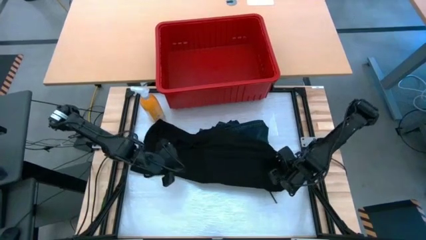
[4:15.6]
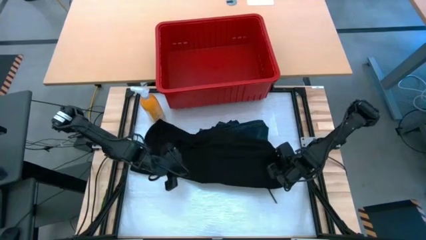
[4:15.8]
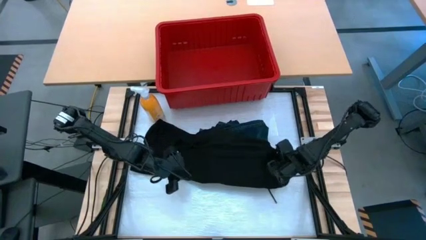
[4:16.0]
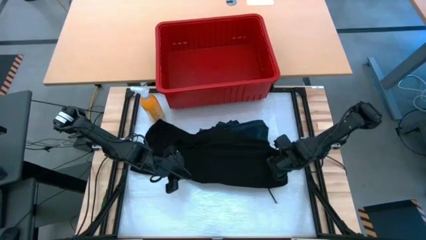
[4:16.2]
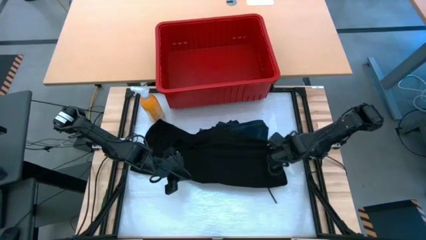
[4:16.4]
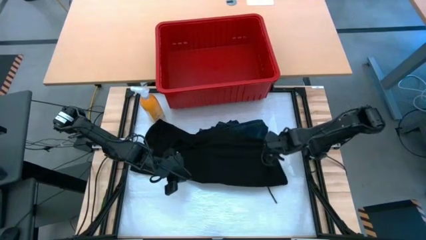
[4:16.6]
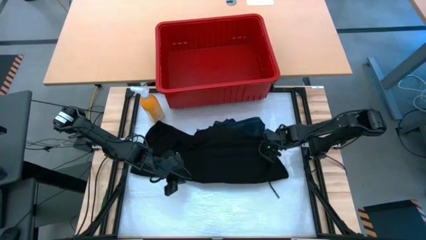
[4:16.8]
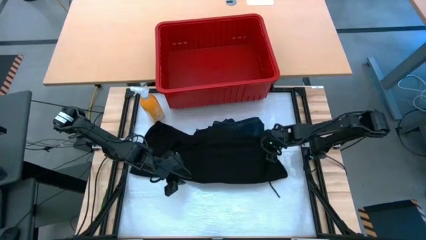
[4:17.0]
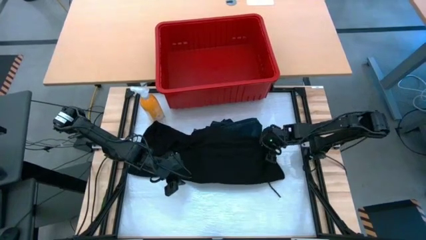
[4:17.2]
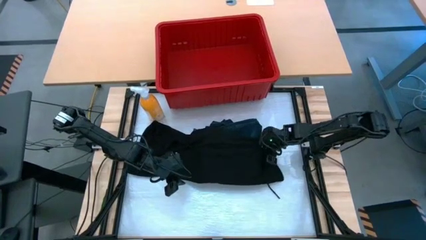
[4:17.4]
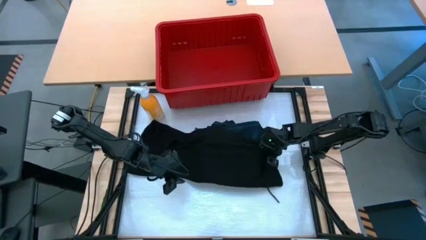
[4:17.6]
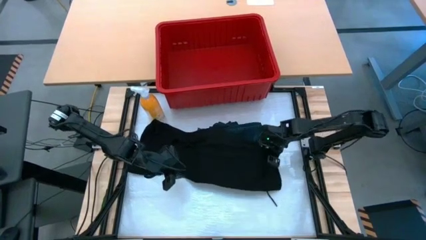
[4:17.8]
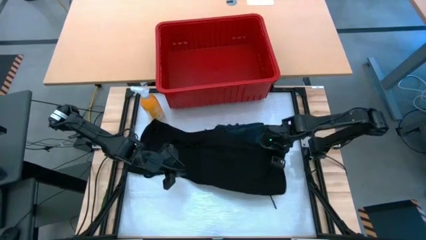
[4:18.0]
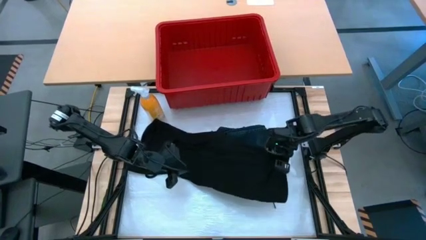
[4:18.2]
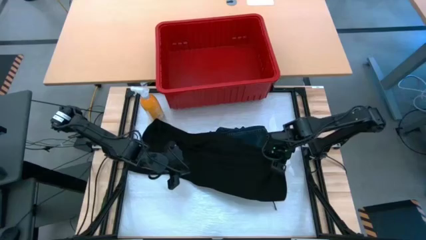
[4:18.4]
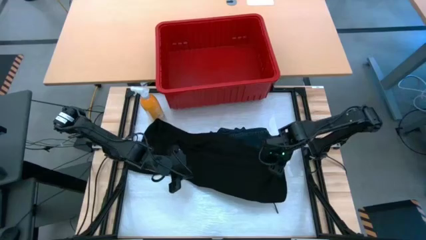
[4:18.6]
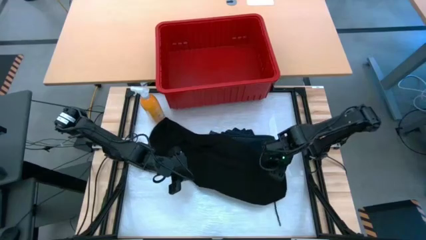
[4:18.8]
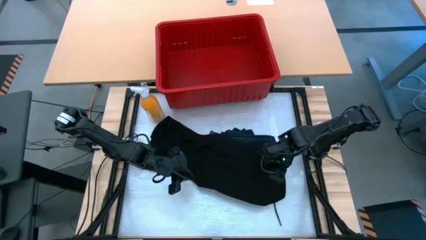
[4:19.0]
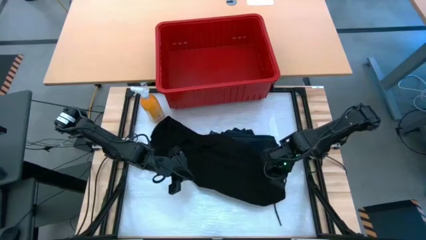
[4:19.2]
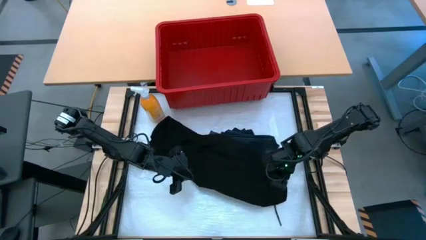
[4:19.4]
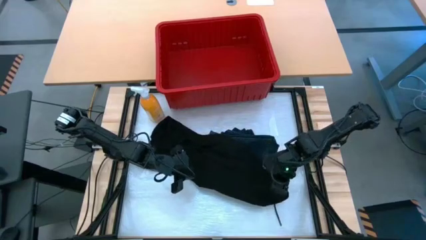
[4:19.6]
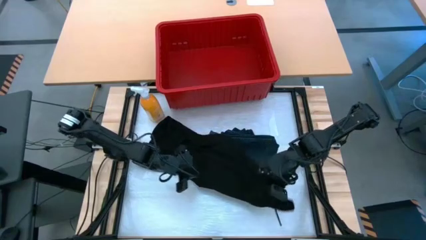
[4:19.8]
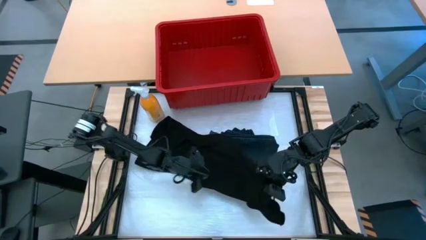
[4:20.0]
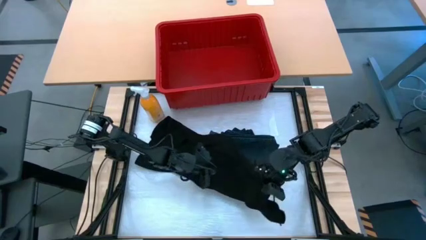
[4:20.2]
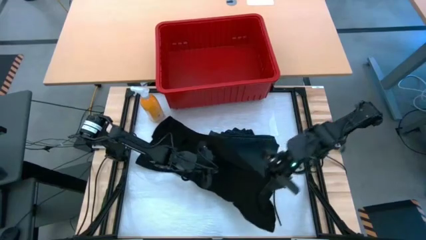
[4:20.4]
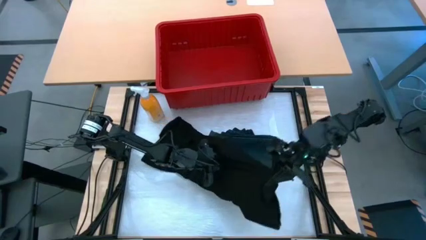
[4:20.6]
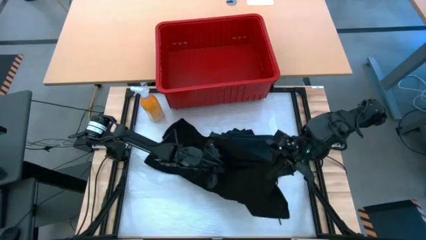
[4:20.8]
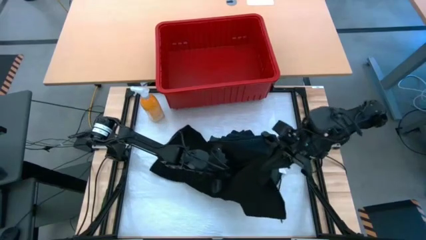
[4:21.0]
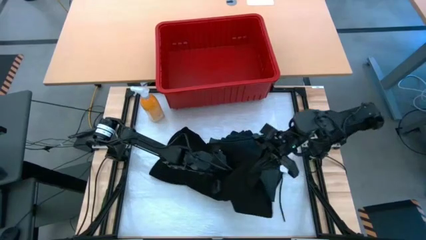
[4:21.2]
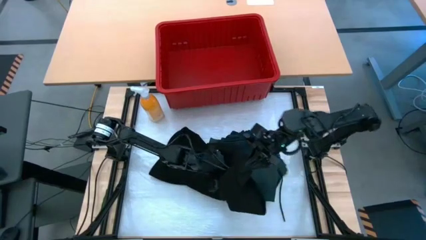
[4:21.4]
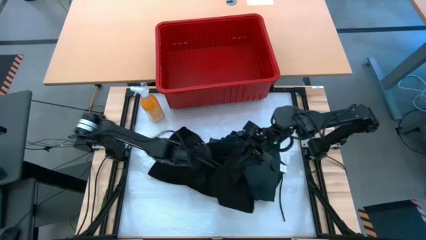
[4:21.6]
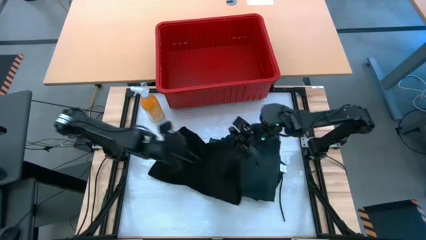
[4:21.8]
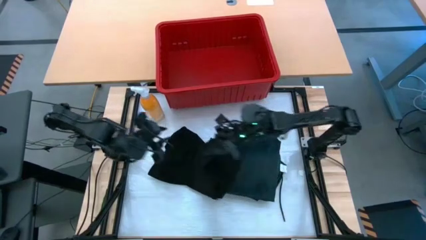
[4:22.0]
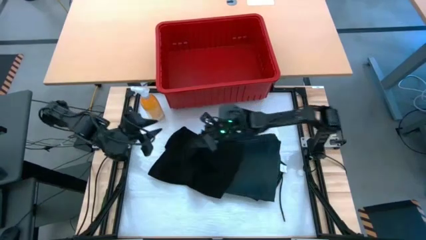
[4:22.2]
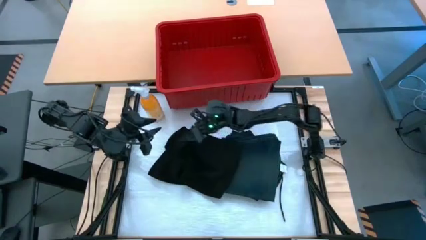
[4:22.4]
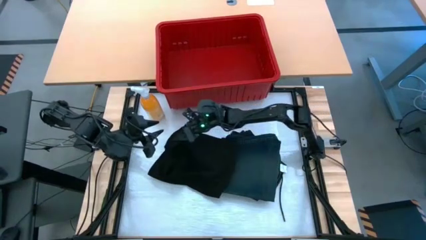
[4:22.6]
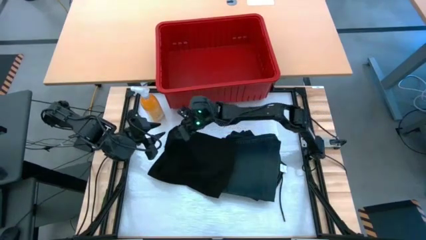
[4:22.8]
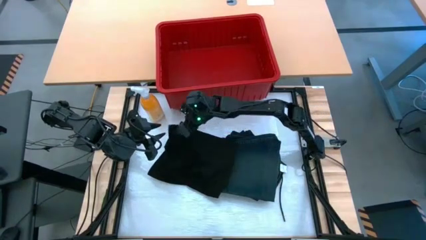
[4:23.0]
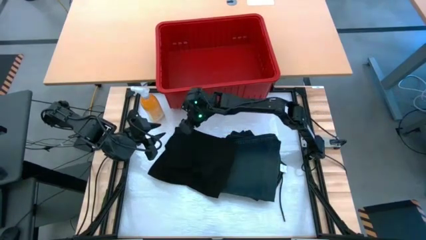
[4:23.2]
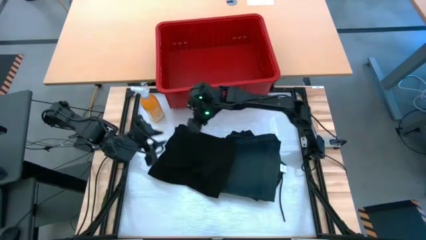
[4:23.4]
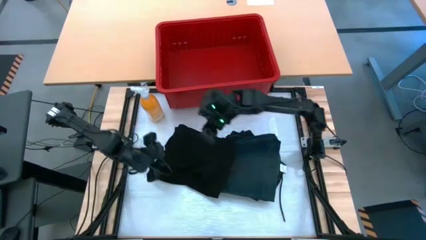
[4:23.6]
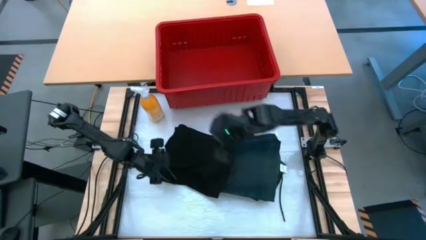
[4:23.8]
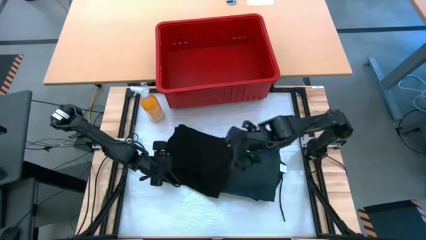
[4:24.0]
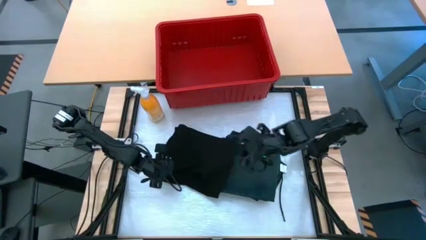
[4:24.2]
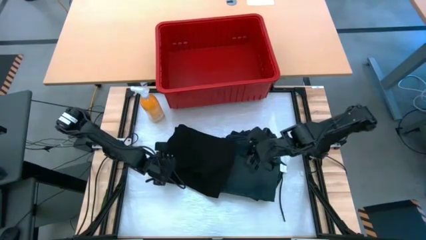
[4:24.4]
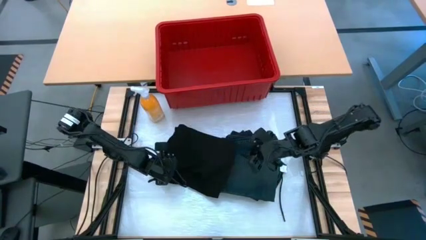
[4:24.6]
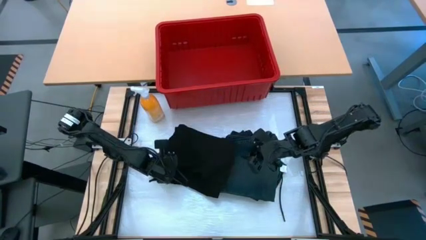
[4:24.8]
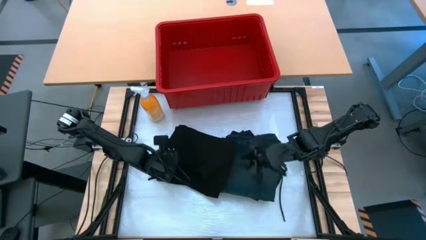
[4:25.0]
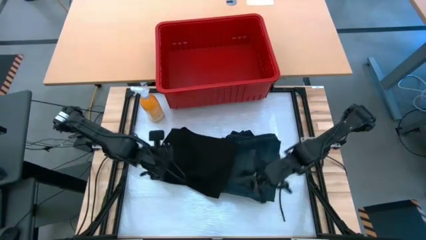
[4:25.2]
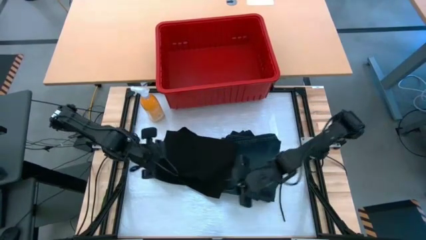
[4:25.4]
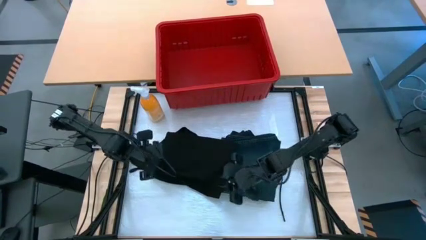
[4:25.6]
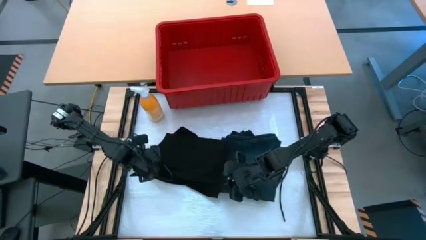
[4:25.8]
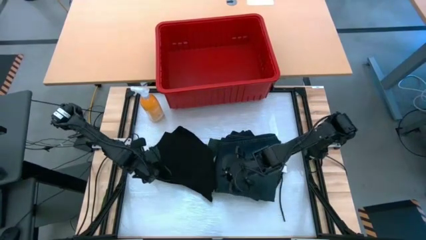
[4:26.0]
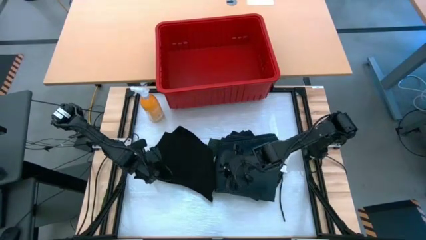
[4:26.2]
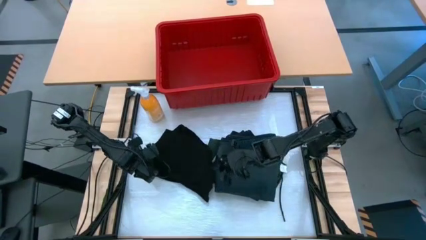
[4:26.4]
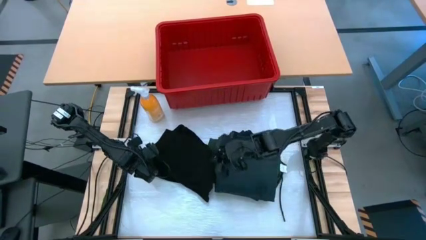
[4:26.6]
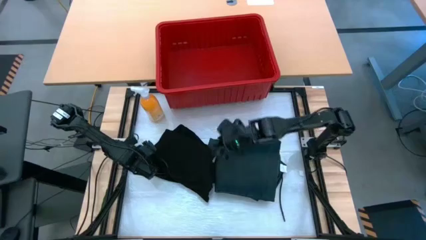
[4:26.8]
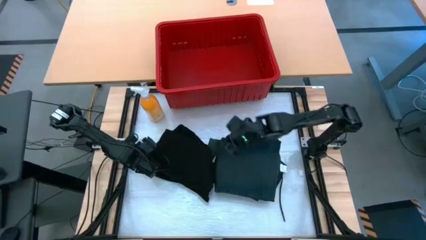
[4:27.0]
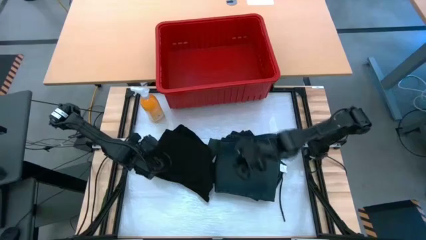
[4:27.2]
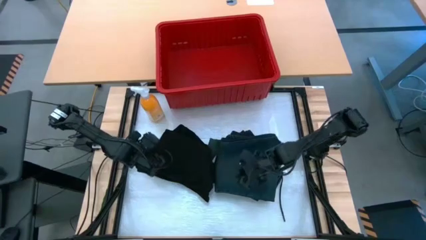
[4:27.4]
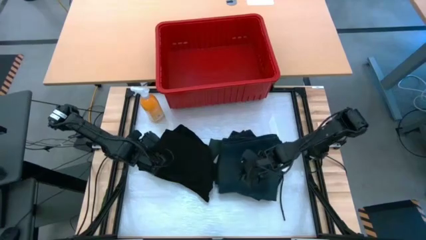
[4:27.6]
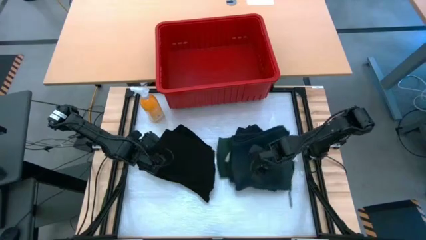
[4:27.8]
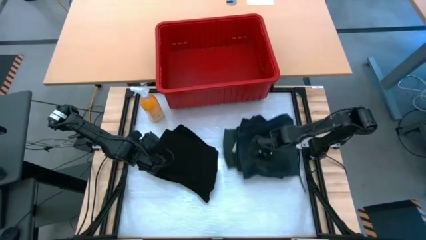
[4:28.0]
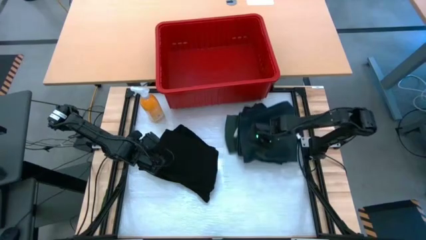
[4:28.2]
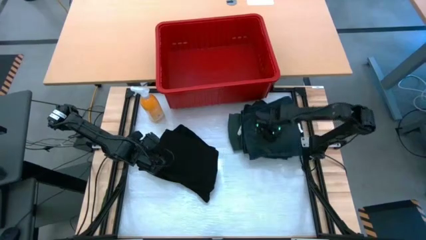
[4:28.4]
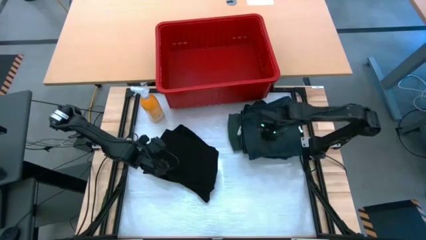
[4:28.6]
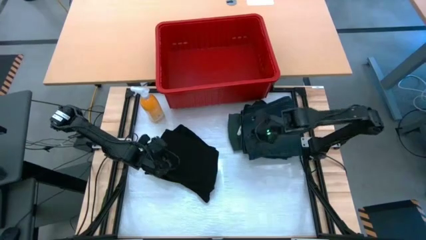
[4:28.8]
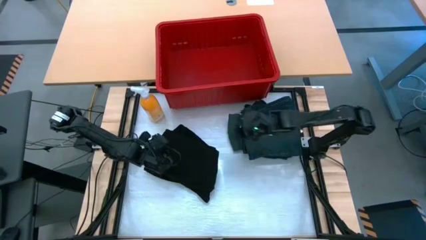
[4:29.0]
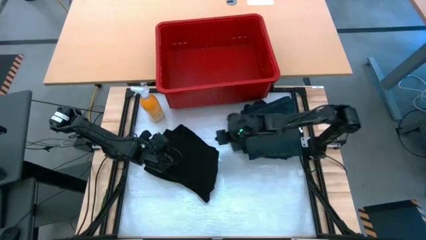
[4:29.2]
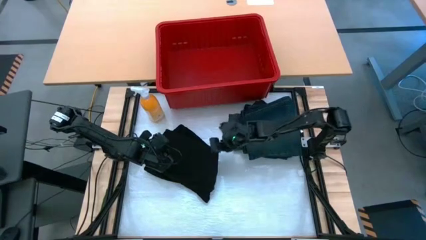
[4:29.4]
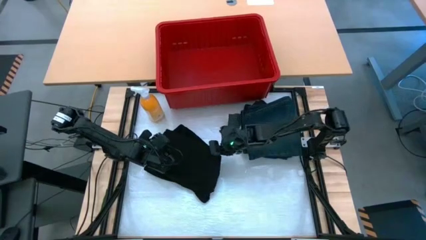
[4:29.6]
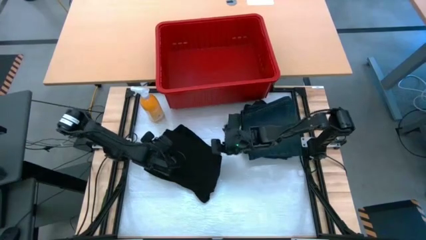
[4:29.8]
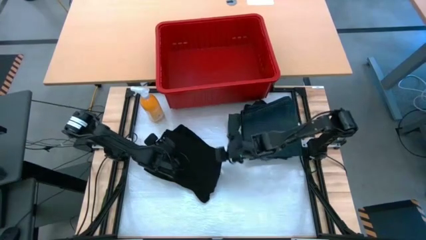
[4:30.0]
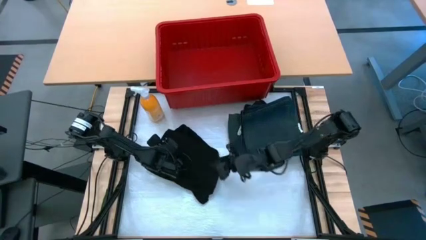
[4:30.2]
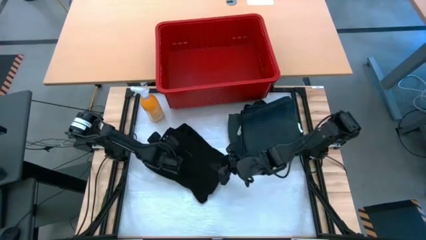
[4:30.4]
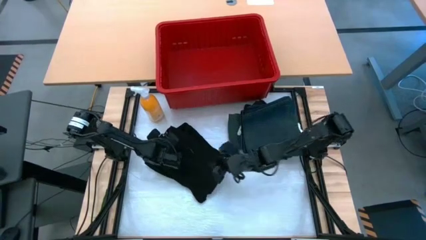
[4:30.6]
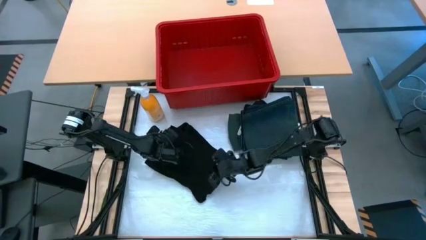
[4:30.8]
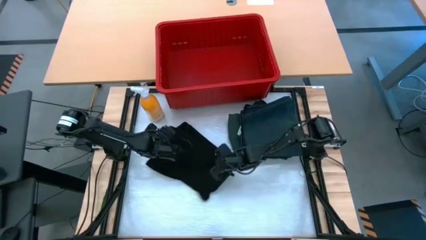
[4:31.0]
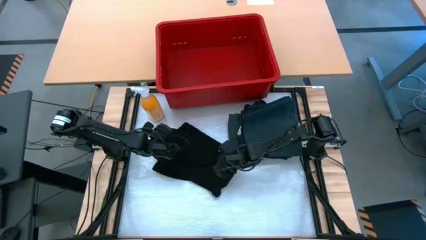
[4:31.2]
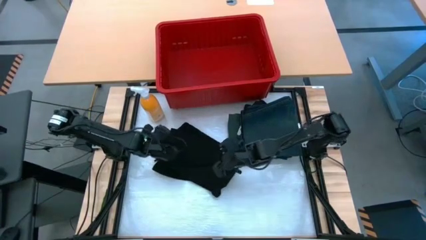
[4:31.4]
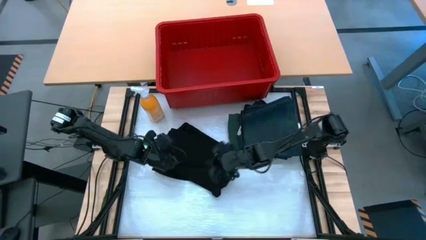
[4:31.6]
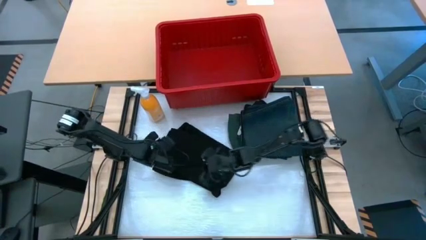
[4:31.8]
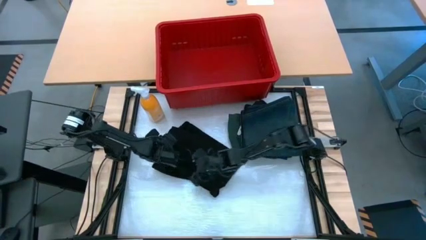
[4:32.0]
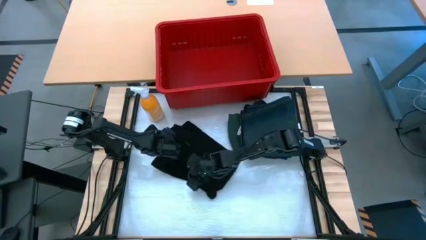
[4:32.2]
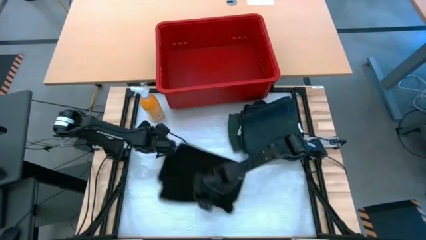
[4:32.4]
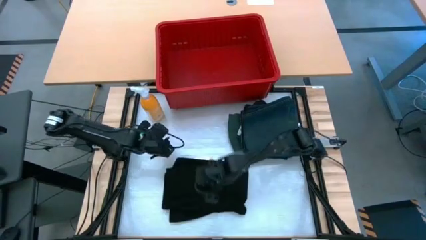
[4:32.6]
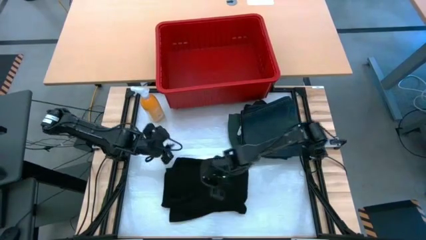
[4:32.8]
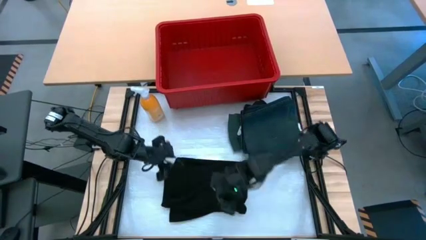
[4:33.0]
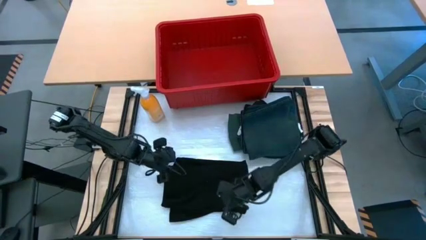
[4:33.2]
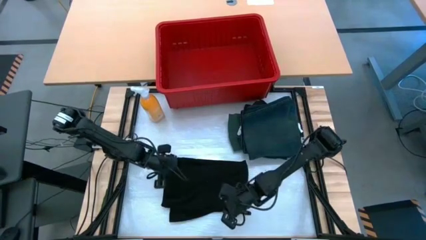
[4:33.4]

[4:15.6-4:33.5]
Task: Fold Laundry from Bin
Fold the black shirt from the red laundry bin
